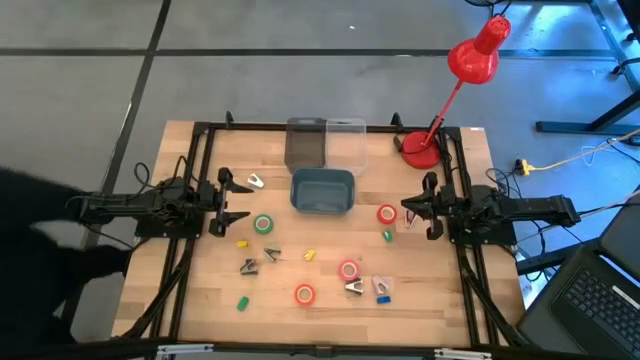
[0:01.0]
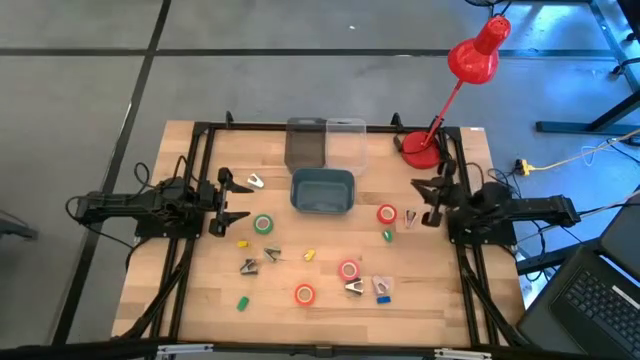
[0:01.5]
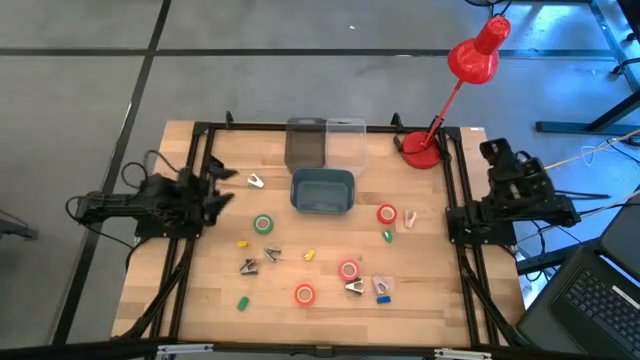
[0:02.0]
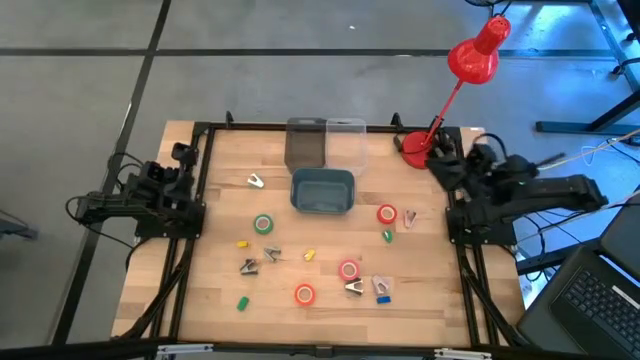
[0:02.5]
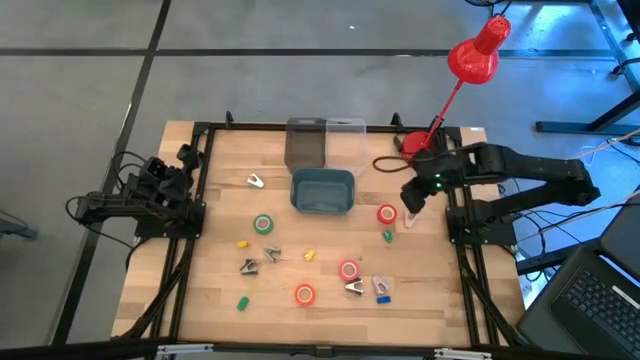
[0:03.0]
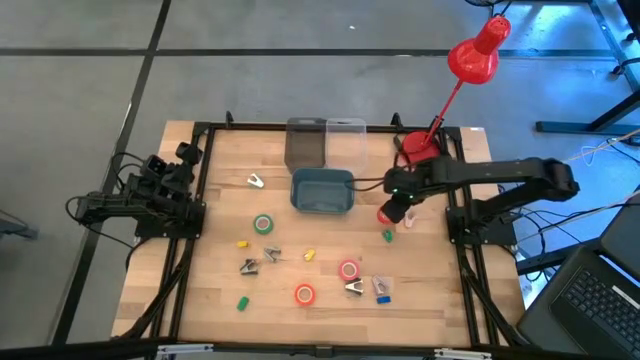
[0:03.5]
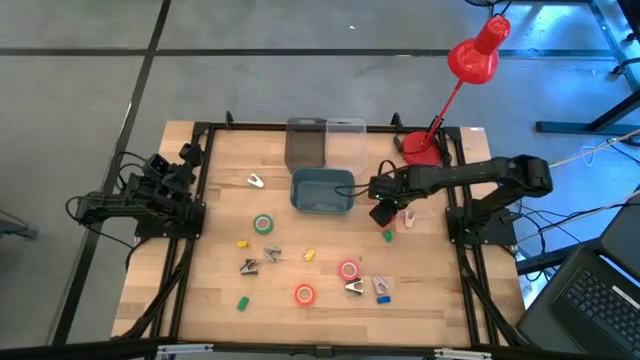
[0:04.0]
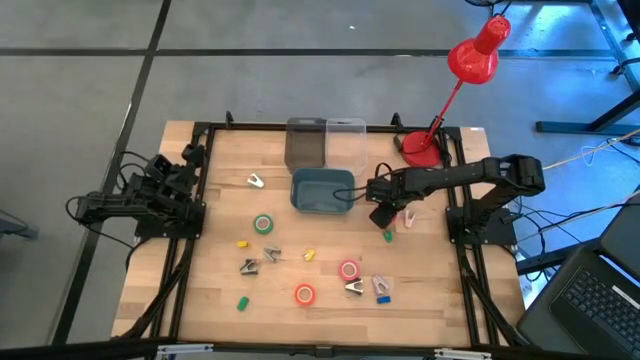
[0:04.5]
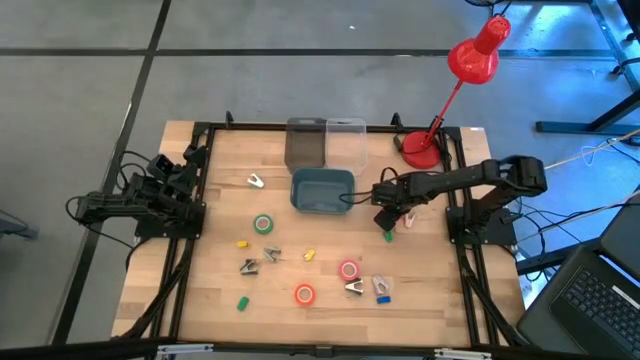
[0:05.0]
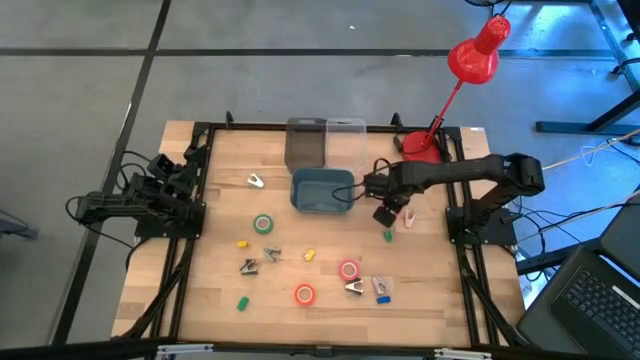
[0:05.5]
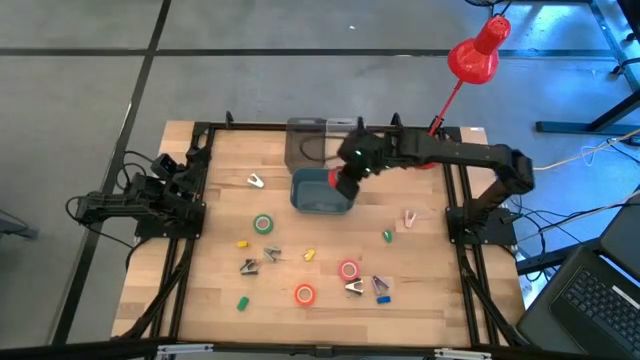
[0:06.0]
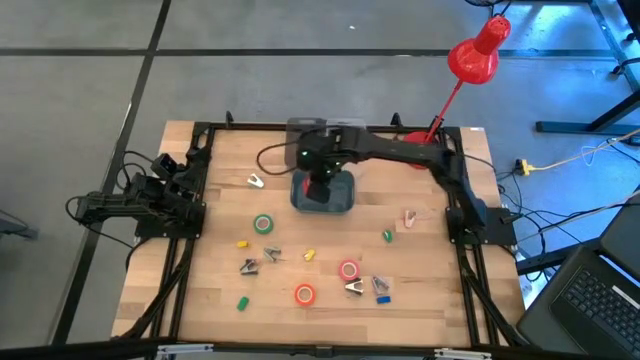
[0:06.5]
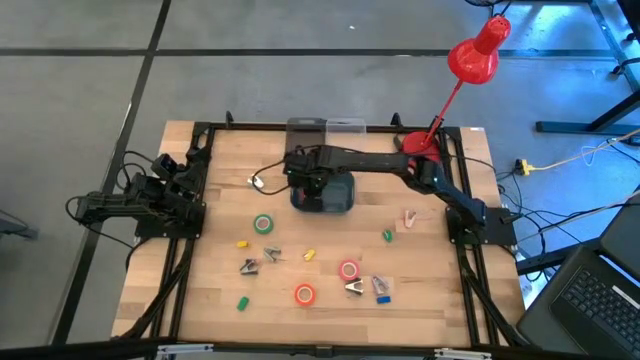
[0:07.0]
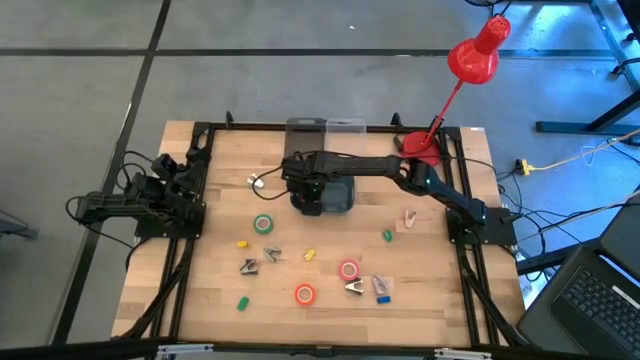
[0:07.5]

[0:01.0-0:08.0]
Task: Pick and place Stapler, Stapler remover, tape
Put the top orange tape into the blue bin

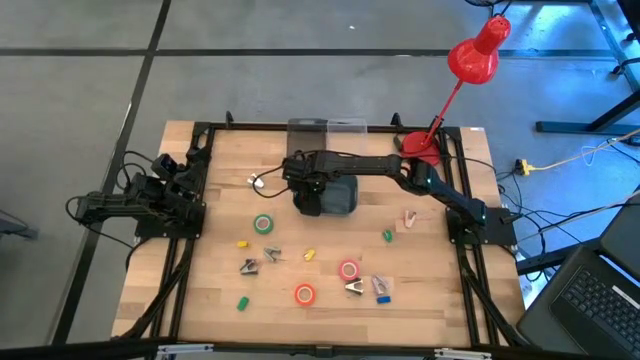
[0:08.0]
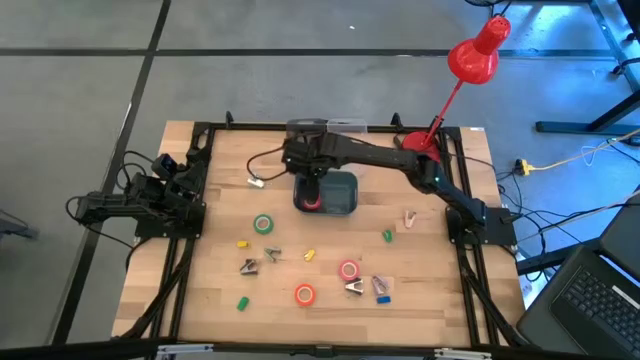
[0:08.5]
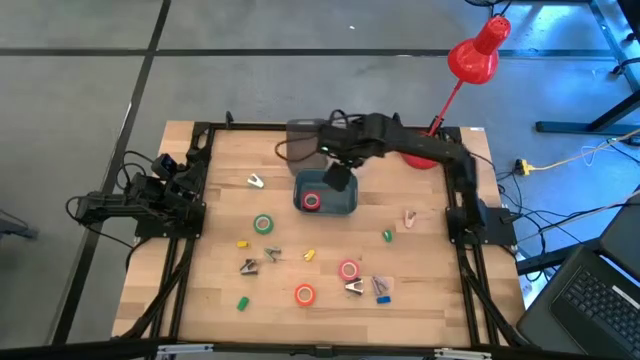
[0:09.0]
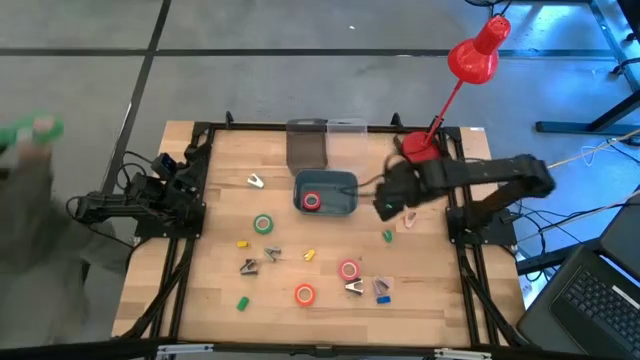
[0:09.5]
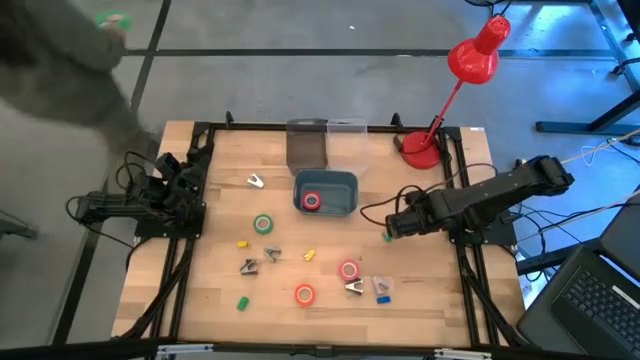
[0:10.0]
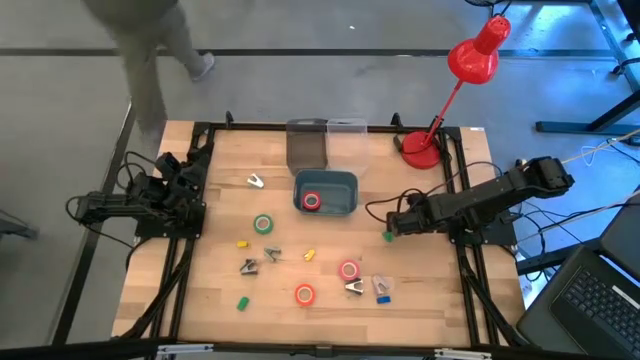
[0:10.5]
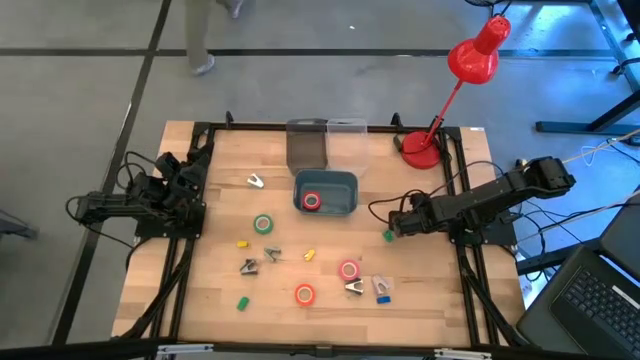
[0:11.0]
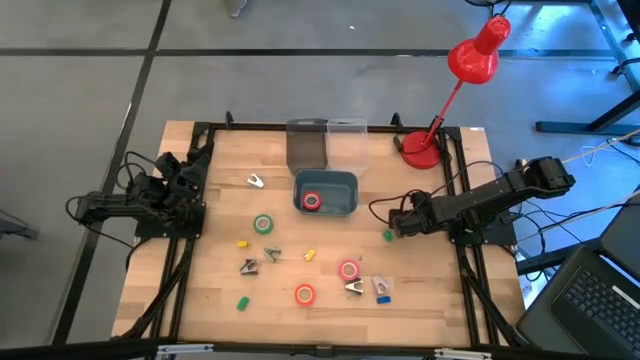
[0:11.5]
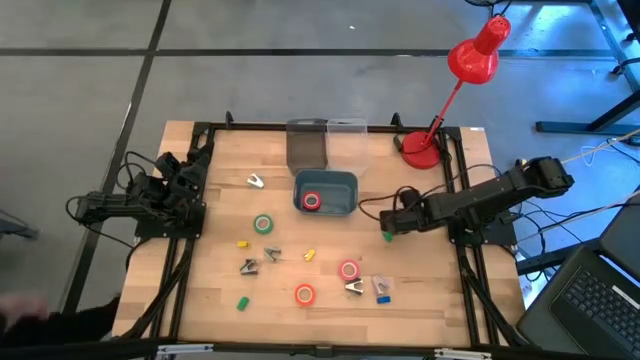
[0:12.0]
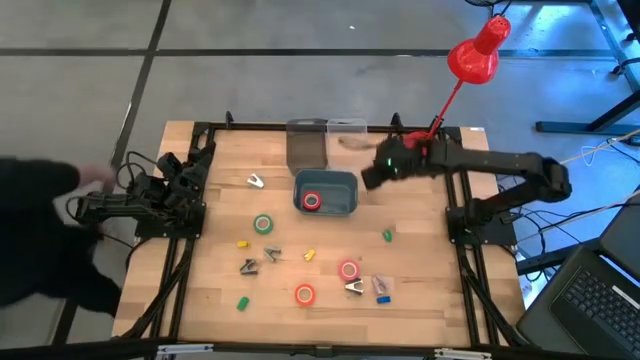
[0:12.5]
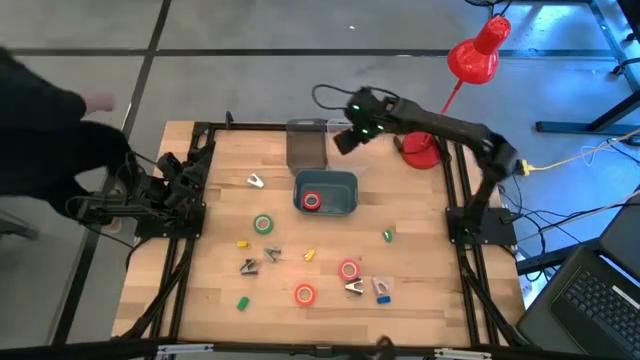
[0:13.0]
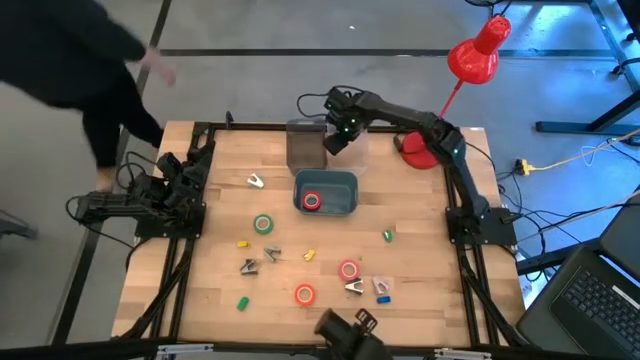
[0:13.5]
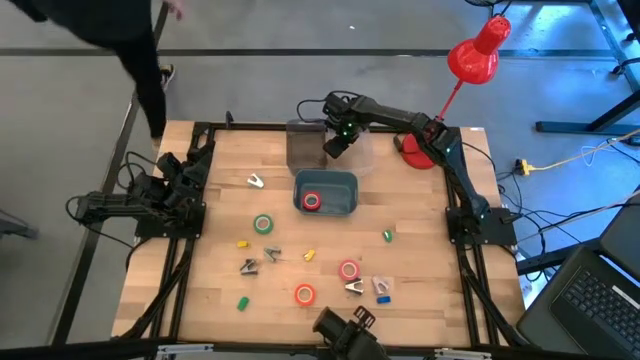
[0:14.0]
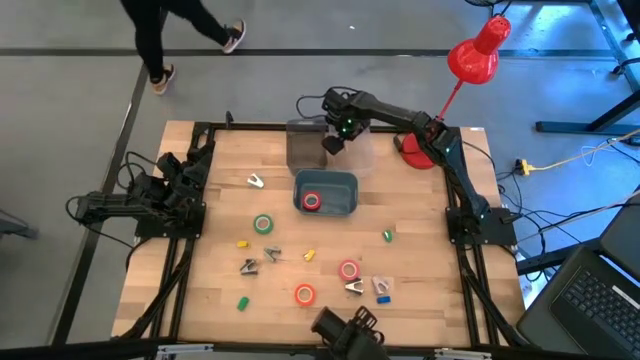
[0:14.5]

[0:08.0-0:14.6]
Put the pink staple remover into the white bin

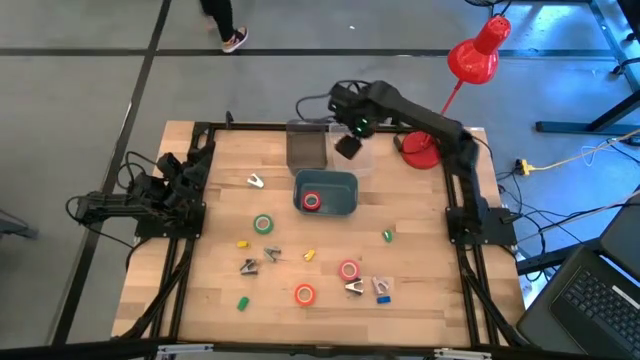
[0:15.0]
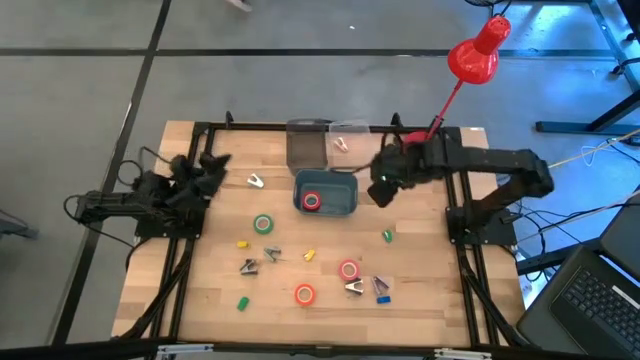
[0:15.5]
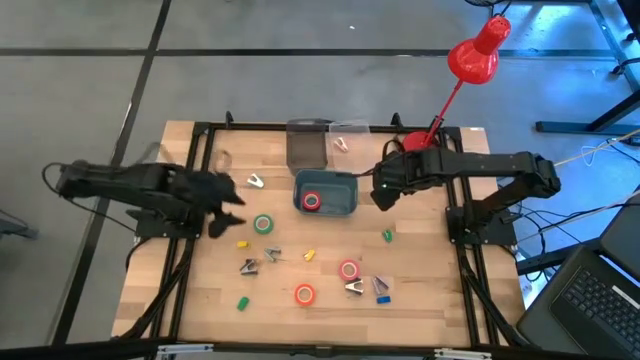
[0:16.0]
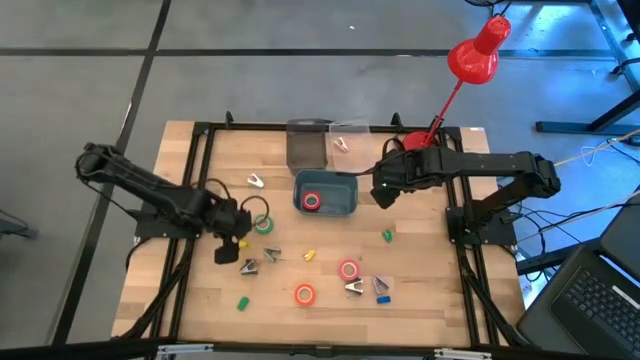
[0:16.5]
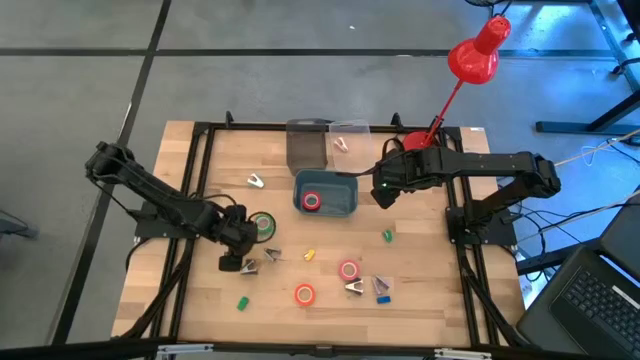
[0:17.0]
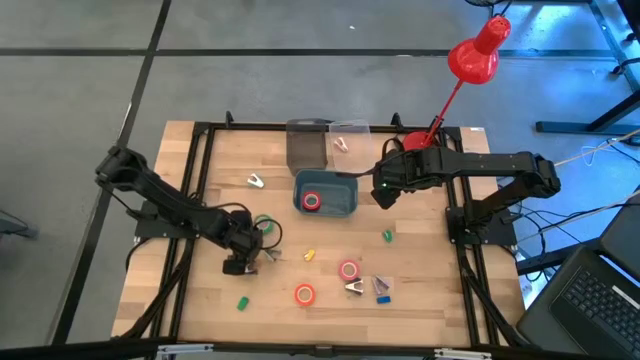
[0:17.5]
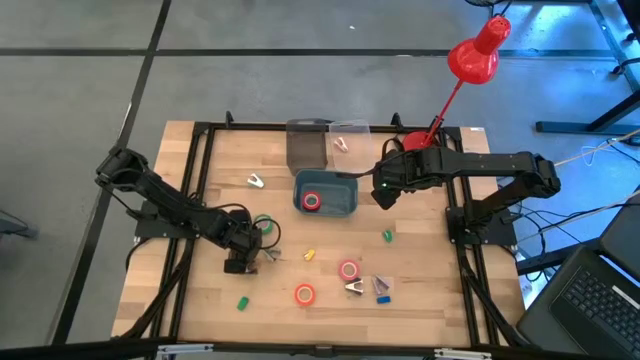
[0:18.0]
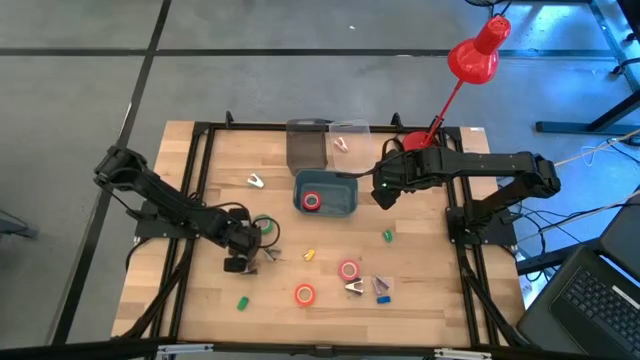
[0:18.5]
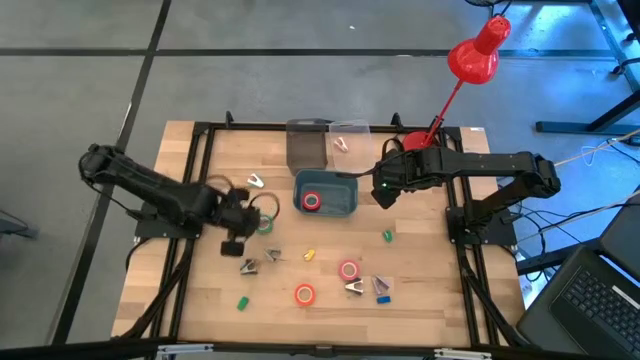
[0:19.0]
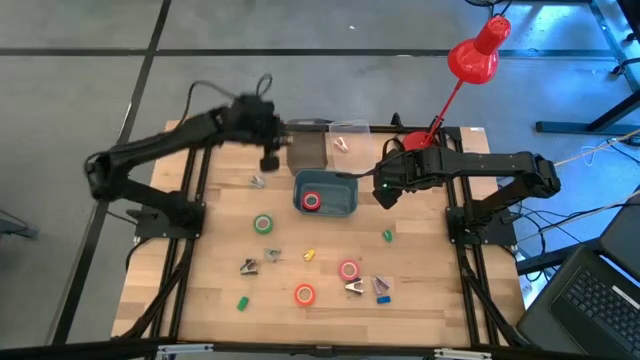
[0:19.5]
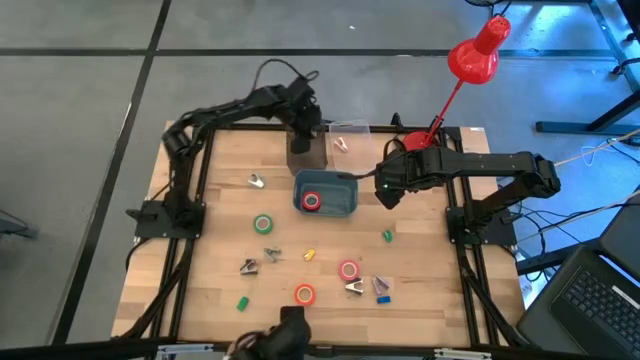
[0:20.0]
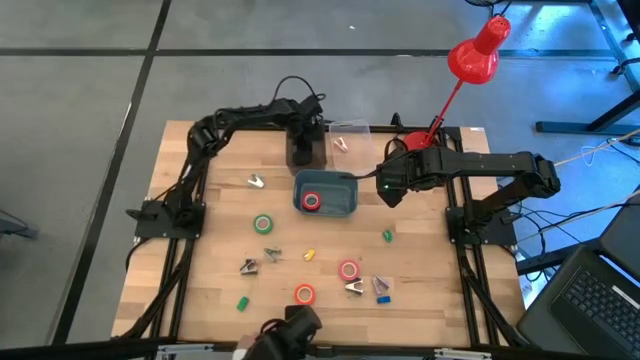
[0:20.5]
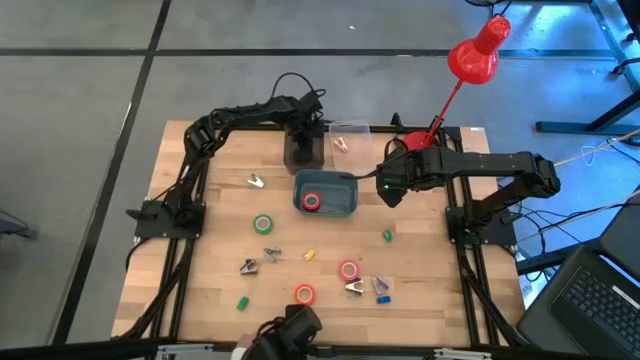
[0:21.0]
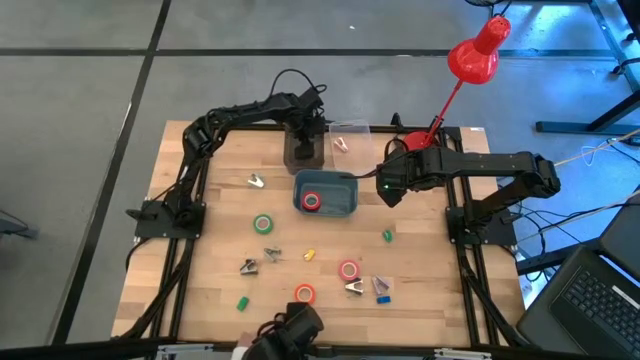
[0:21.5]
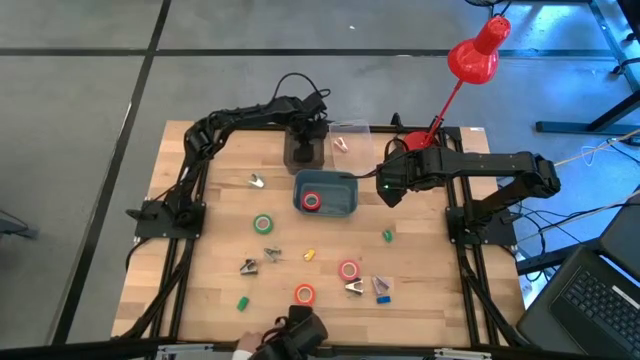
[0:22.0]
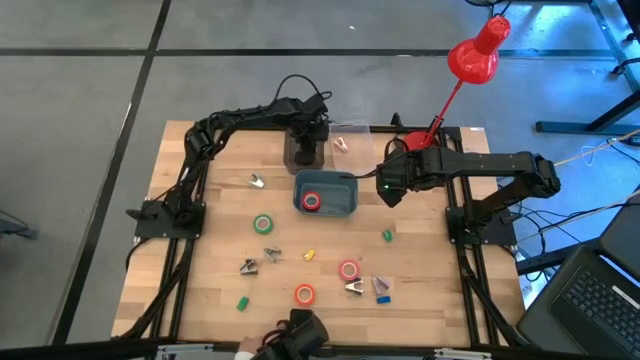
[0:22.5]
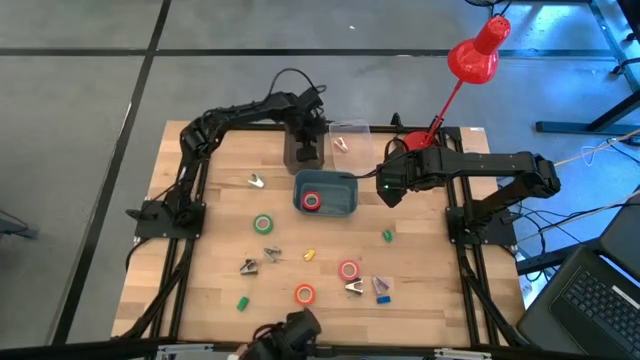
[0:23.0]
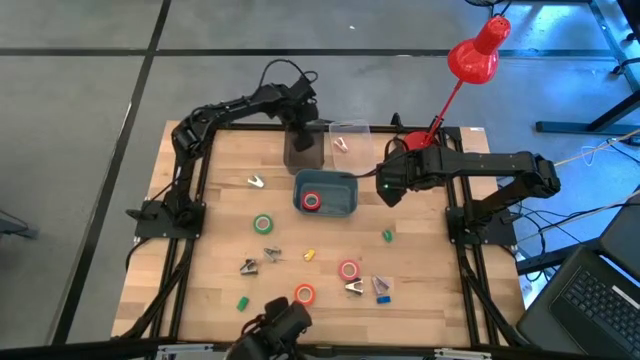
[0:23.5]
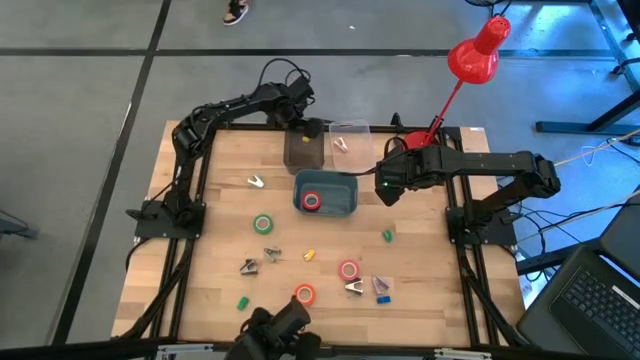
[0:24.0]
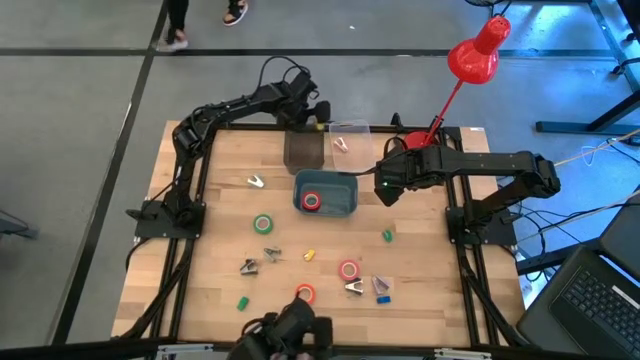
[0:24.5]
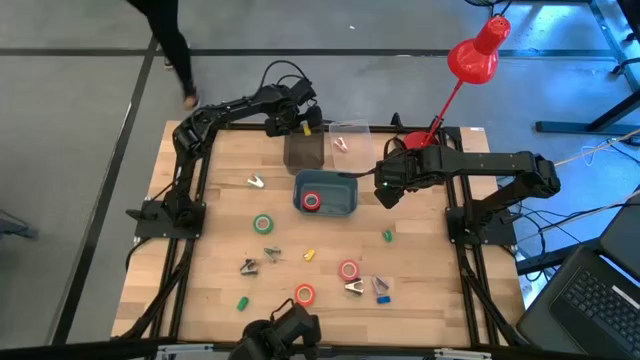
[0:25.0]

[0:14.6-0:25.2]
Put the left yellow stapler into the black bin
